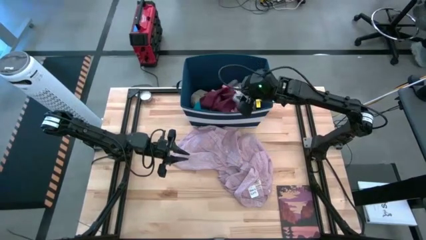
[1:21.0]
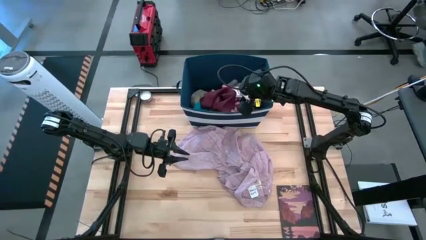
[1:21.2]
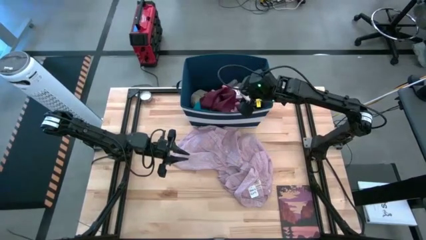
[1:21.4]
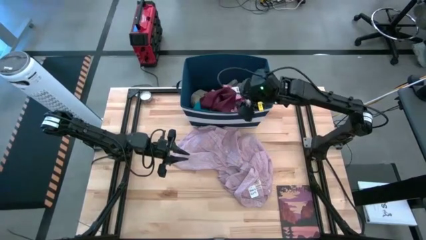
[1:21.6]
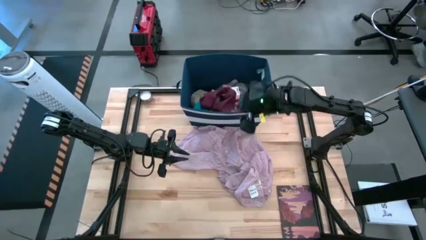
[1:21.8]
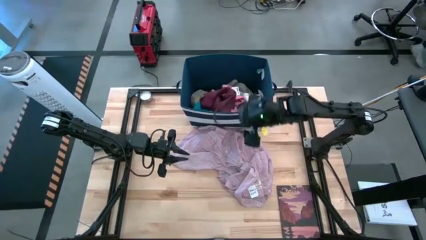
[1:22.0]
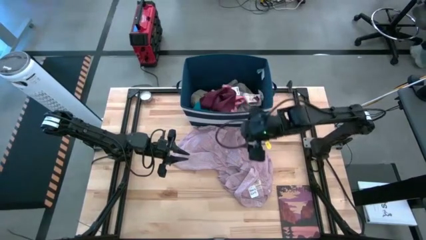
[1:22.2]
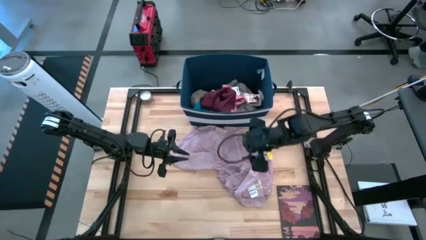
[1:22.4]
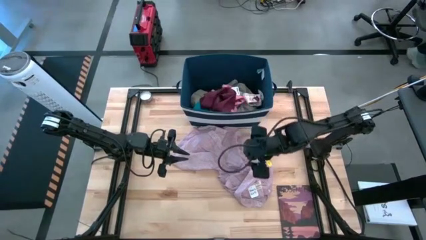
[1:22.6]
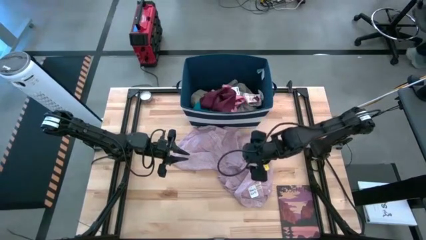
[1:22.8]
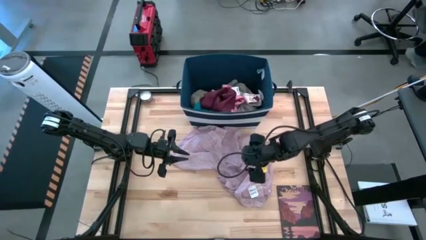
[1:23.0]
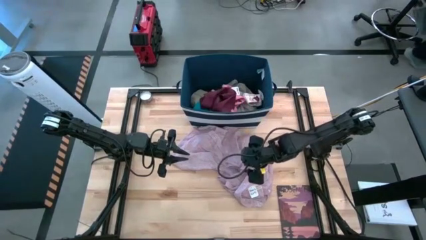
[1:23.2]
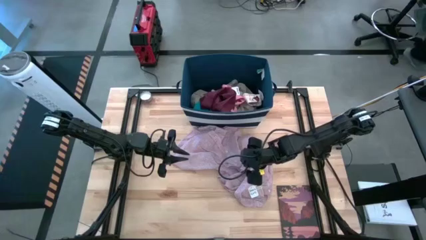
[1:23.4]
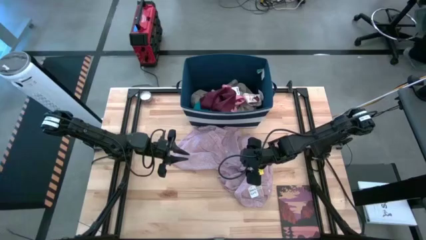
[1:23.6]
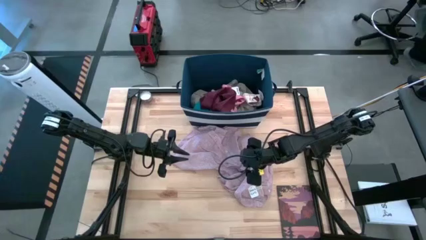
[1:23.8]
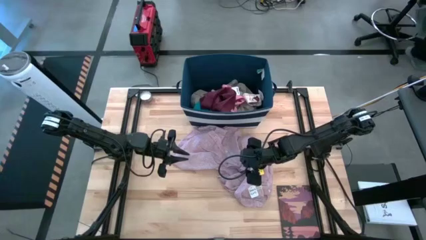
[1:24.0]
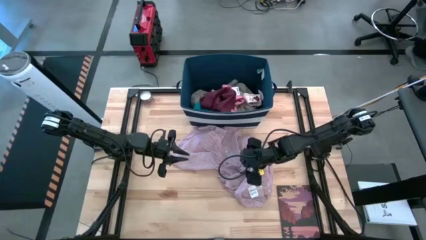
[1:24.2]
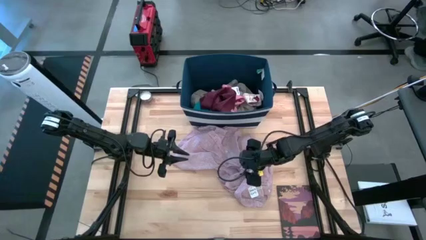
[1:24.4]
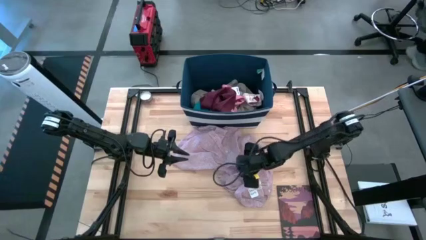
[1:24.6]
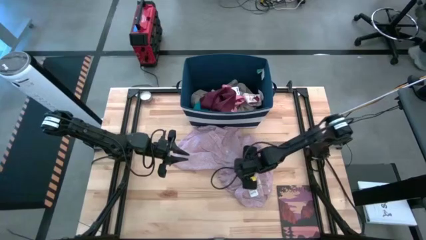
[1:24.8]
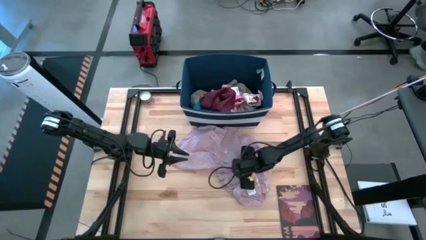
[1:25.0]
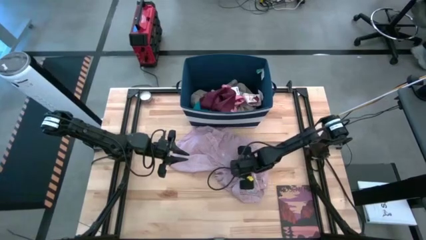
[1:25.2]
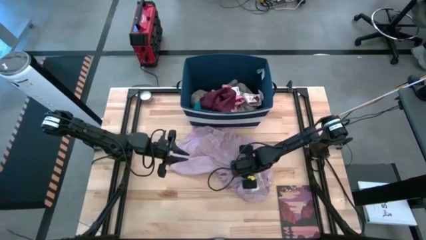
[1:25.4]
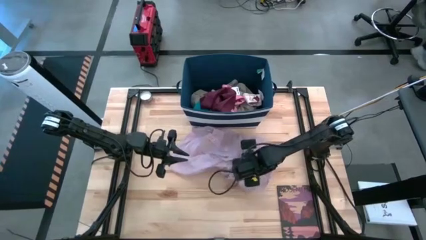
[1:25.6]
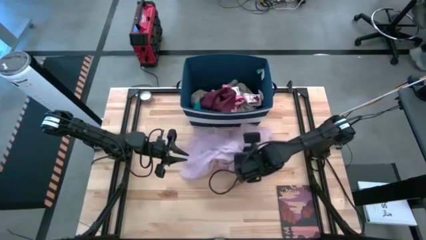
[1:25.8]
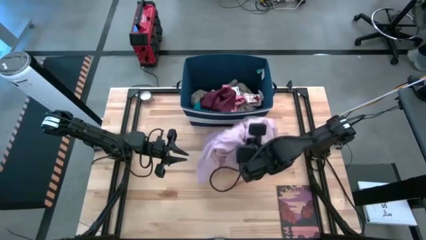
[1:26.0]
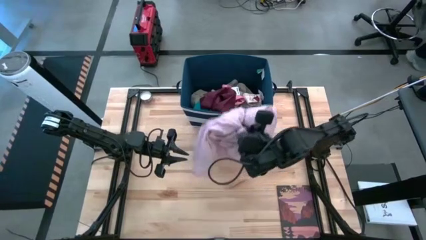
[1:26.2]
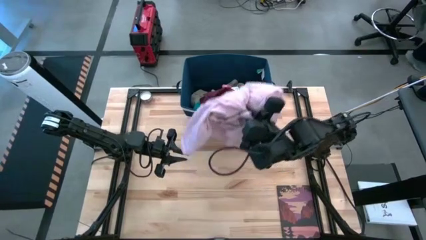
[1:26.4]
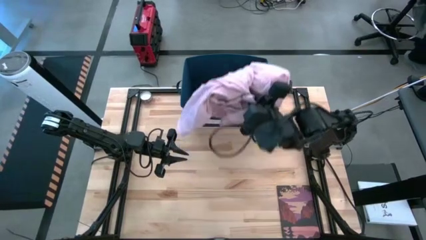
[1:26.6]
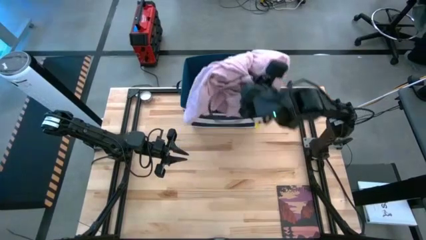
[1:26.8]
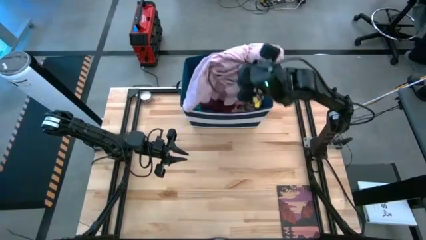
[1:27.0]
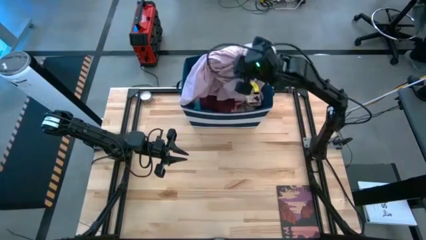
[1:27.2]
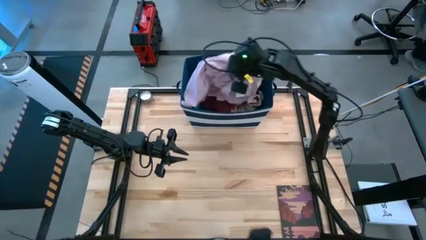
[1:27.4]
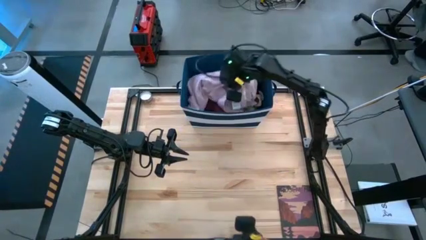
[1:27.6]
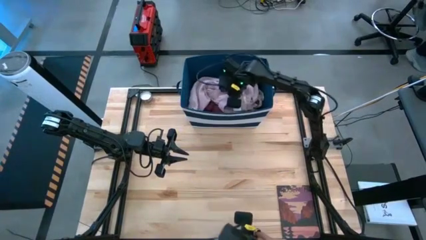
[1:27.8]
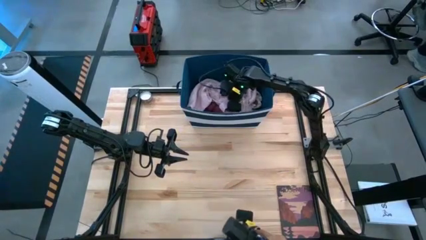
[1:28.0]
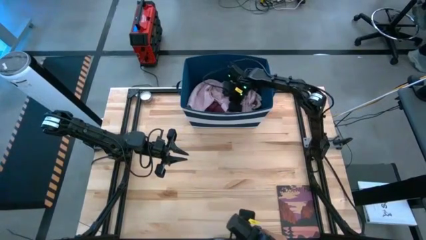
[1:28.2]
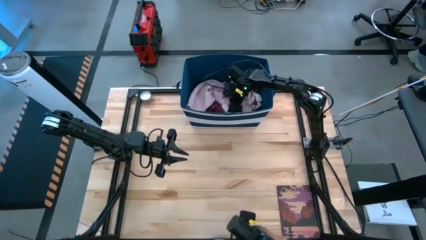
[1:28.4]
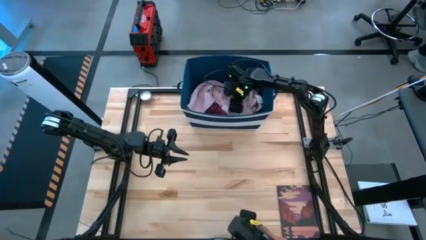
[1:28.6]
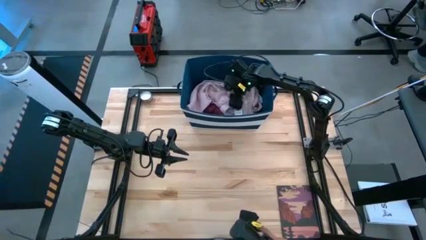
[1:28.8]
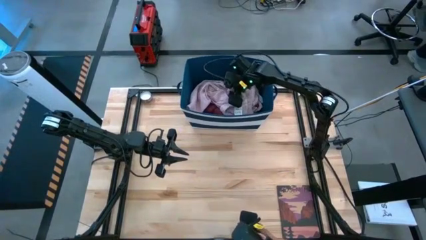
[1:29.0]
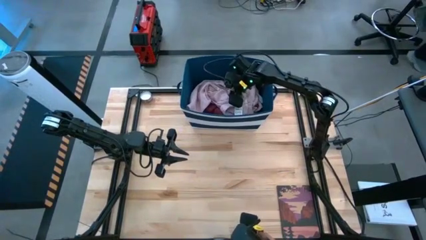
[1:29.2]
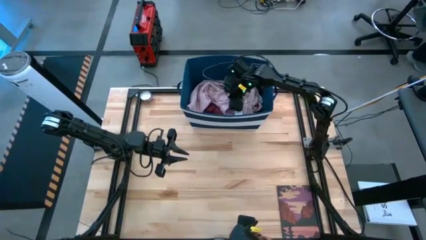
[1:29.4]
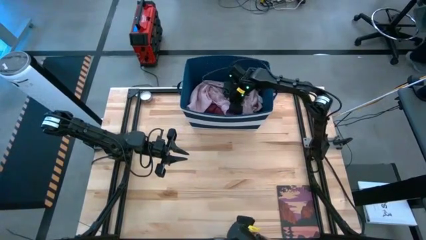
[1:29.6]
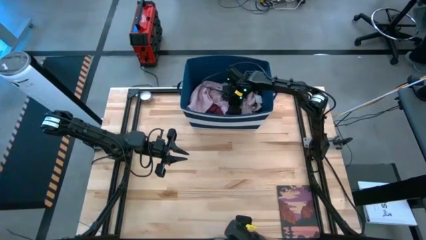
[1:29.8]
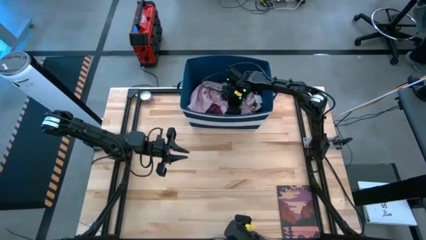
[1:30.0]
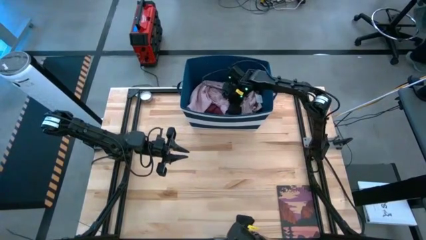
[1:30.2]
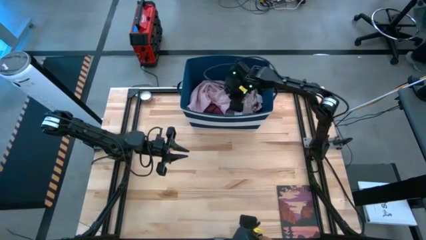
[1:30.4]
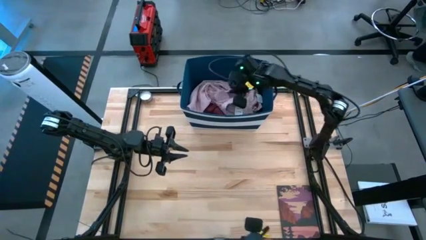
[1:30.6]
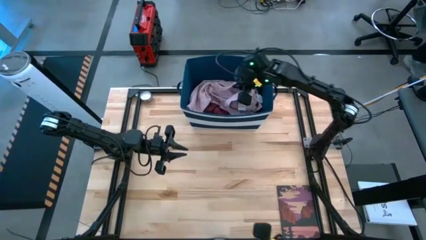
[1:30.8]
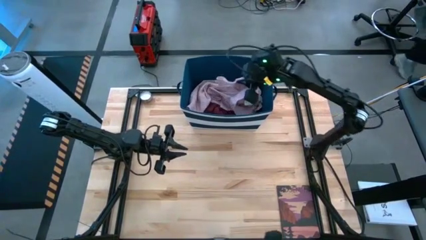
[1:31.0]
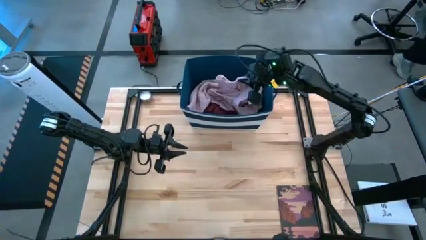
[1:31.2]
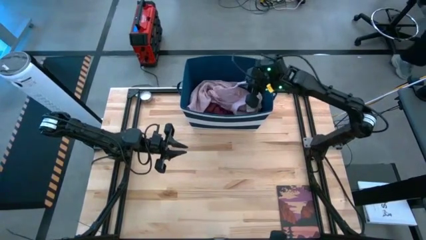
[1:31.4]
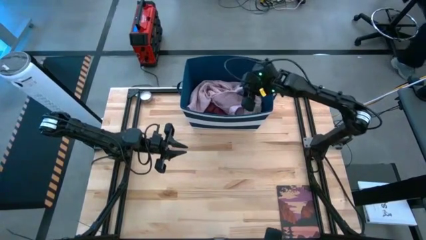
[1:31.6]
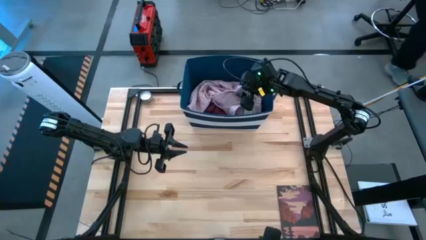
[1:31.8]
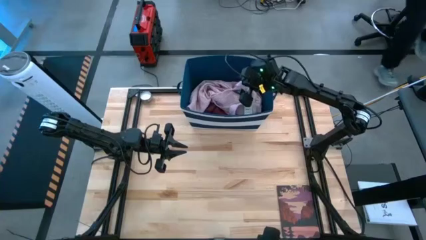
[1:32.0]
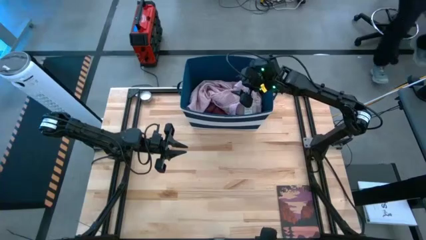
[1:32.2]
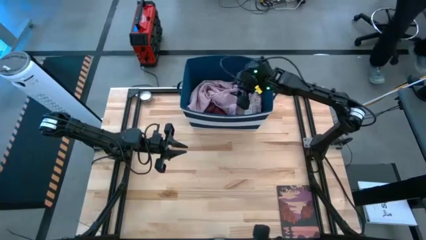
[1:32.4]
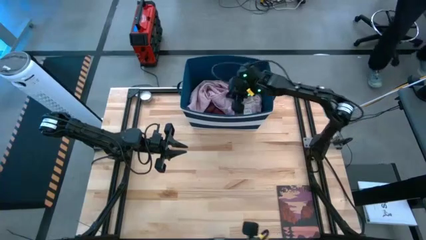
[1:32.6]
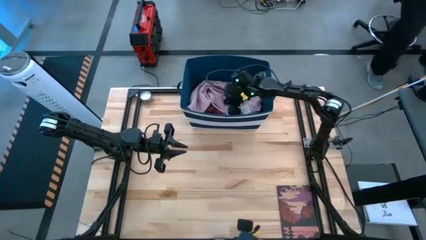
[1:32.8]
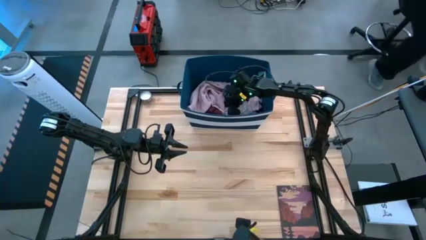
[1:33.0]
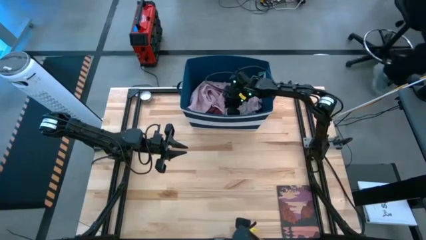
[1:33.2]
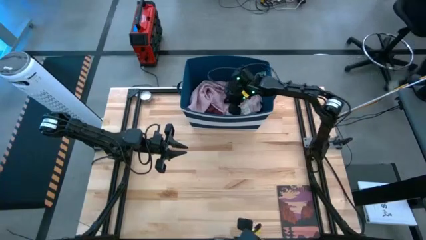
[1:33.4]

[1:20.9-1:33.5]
Task: Sort clothes
Put the pink polo shirt into the blue laundry organizer
